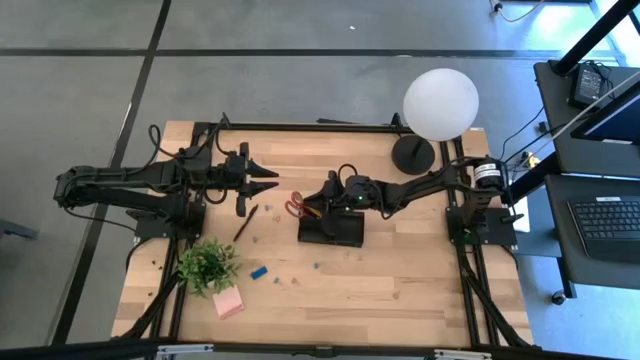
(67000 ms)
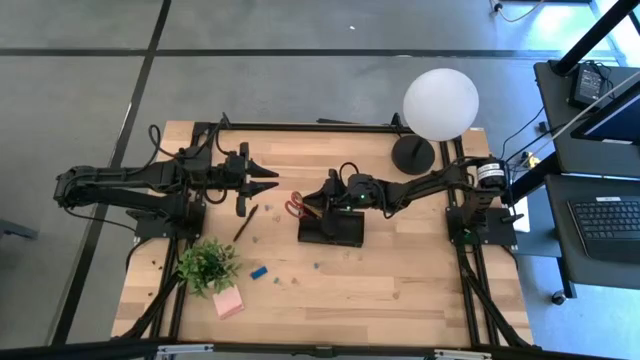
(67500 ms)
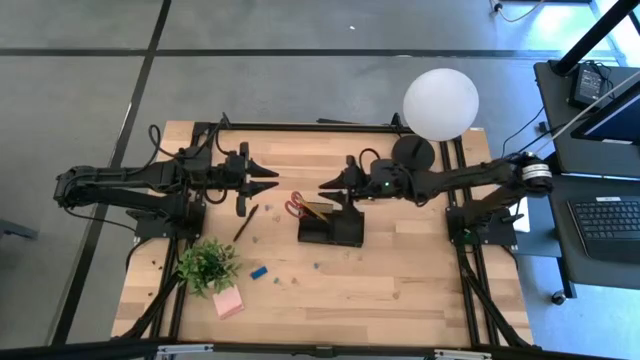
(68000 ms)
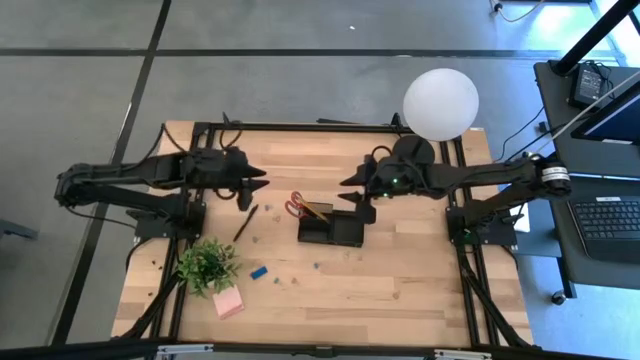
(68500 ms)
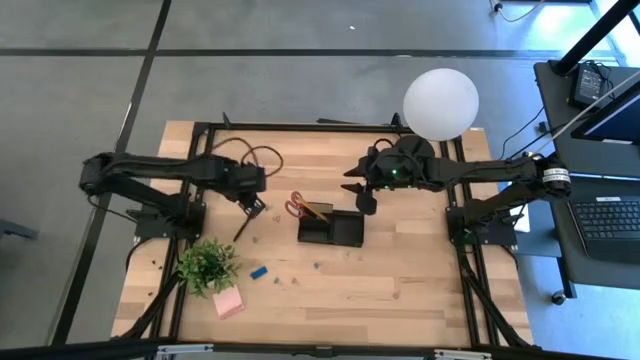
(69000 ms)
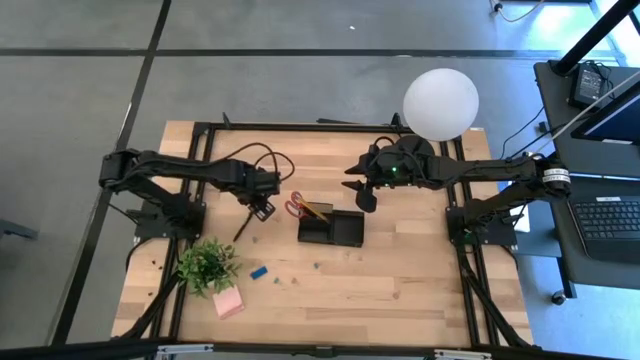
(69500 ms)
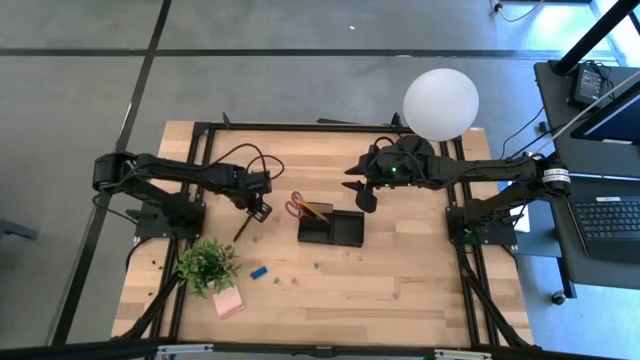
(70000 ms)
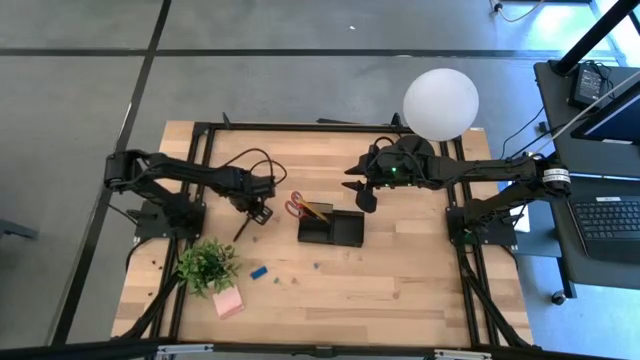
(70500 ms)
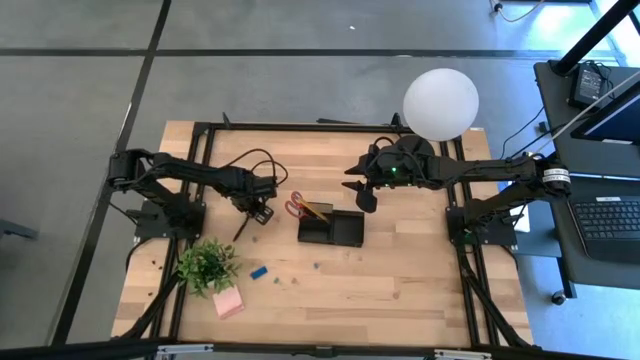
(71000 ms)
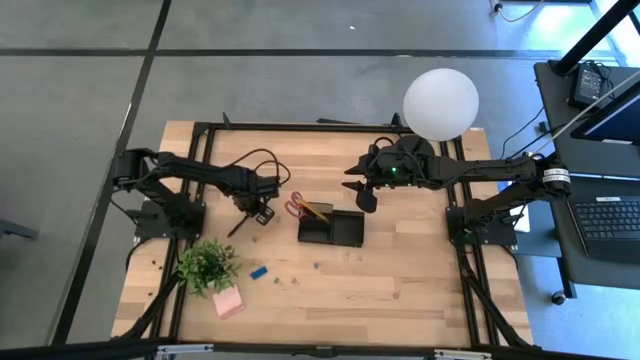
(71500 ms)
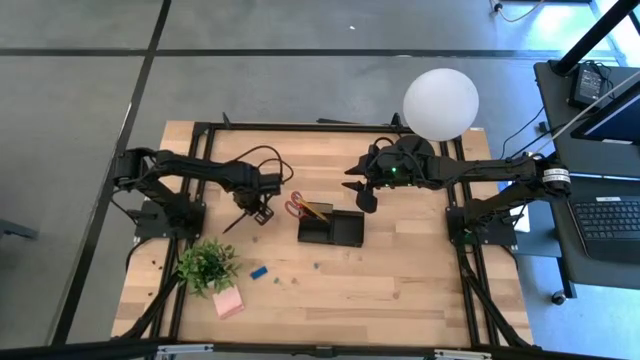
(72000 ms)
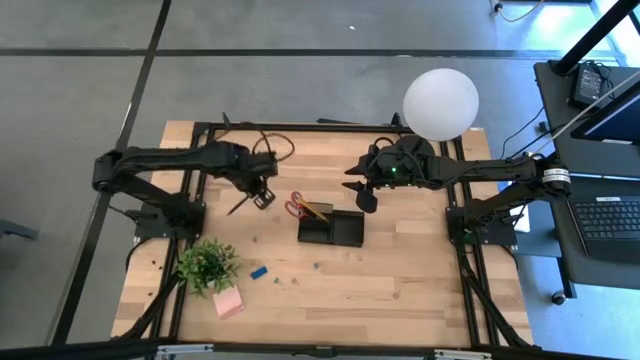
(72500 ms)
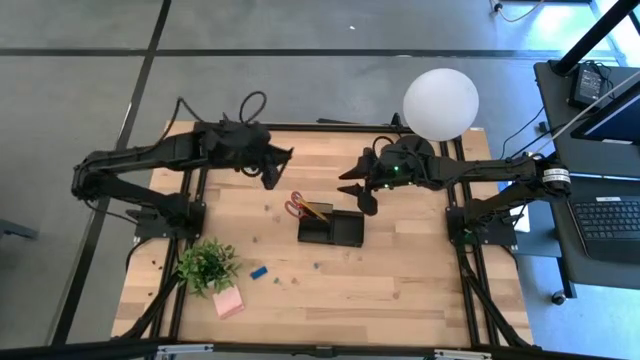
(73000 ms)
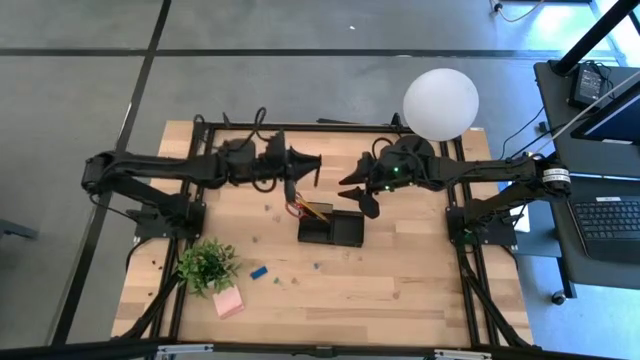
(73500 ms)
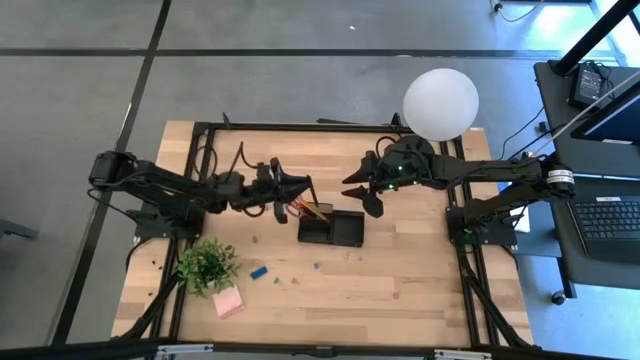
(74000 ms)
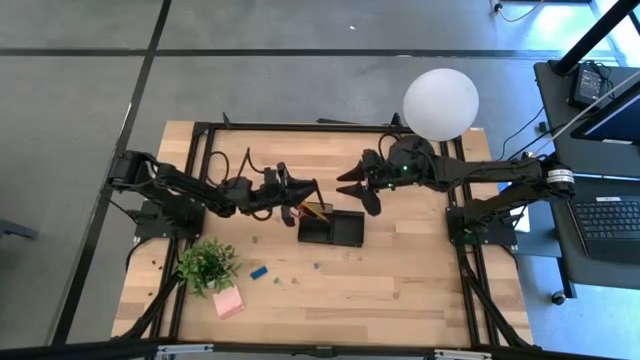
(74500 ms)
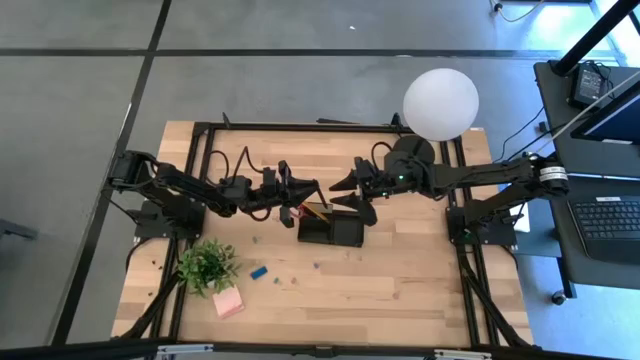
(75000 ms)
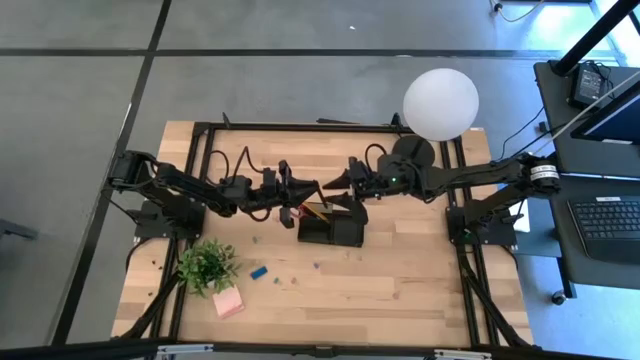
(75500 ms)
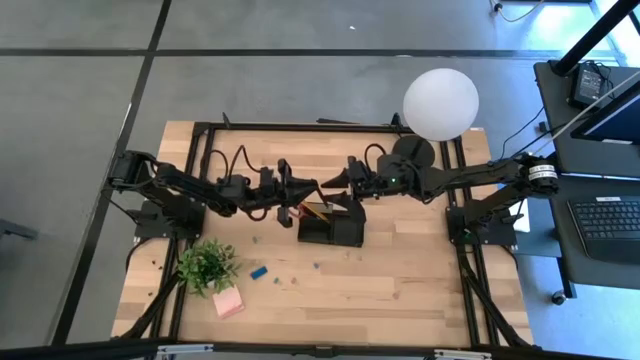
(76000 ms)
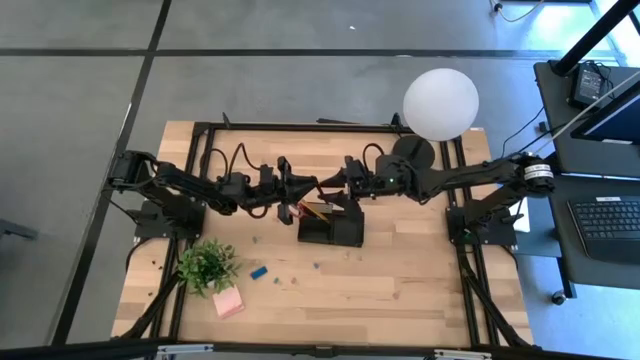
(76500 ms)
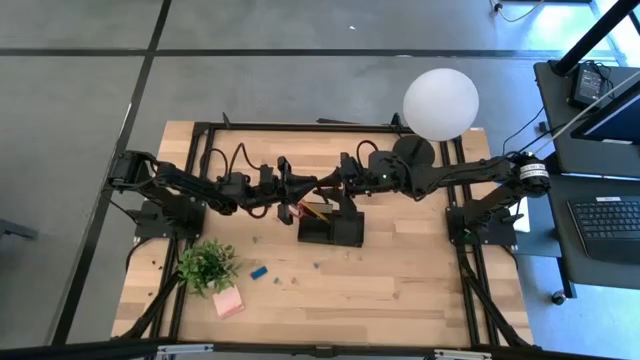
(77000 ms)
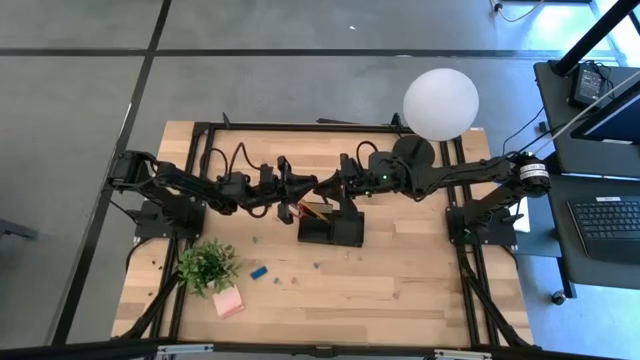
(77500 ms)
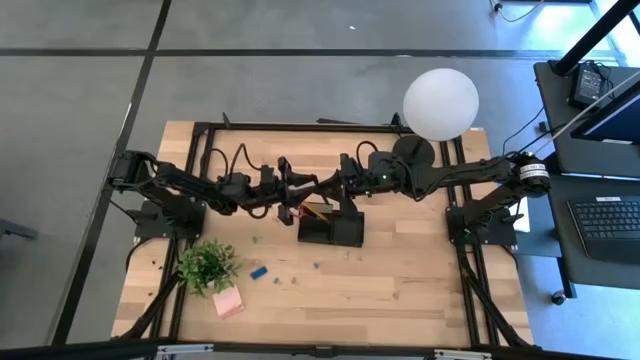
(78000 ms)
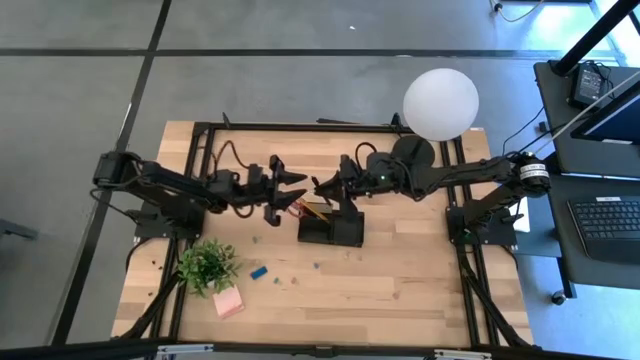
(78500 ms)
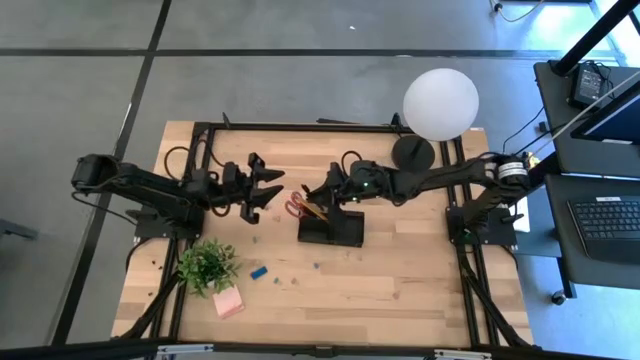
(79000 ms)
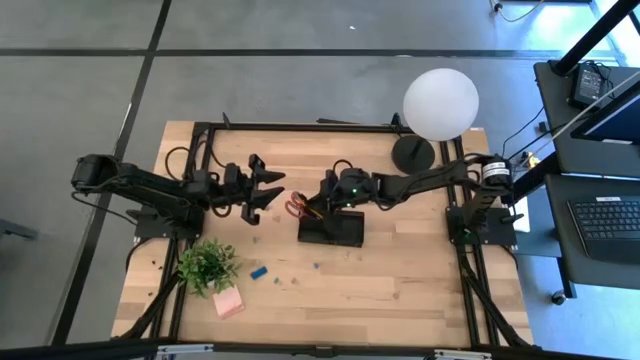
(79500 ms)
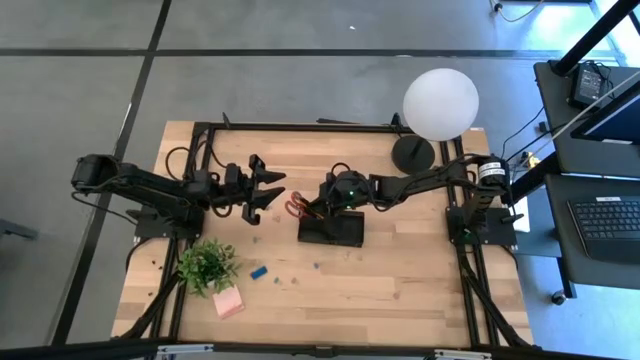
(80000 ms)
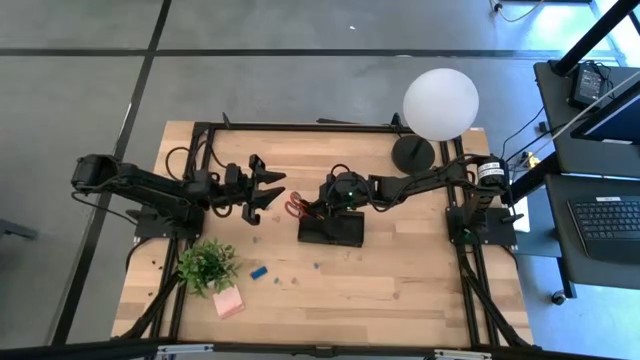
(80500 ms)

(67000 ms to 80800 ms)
Task: Pick and place office supplies into organizer
Put the black pen into the black desk organizer

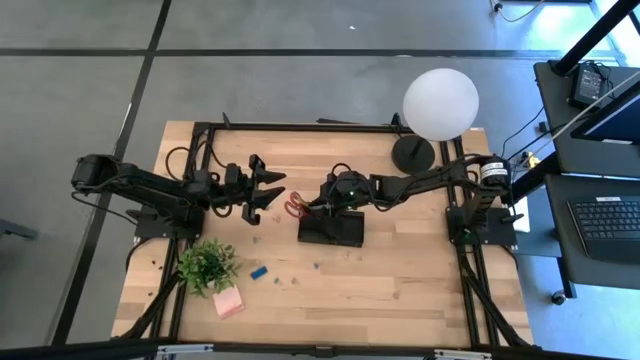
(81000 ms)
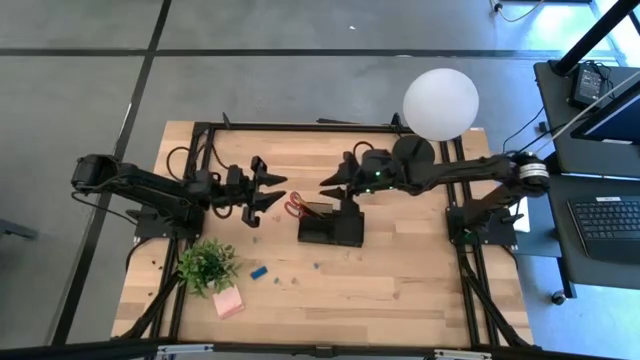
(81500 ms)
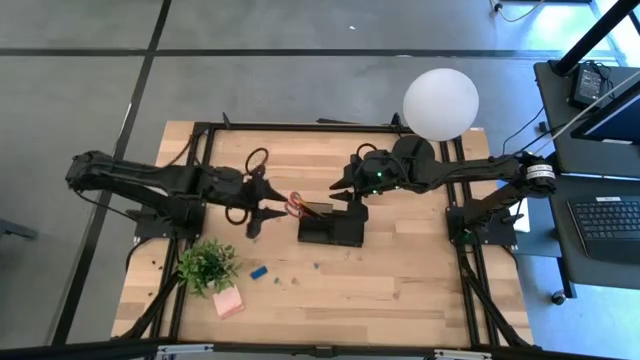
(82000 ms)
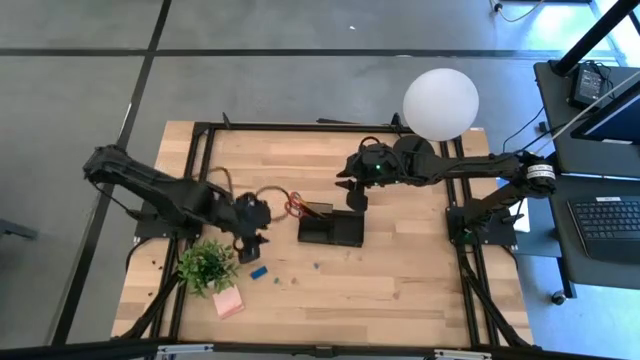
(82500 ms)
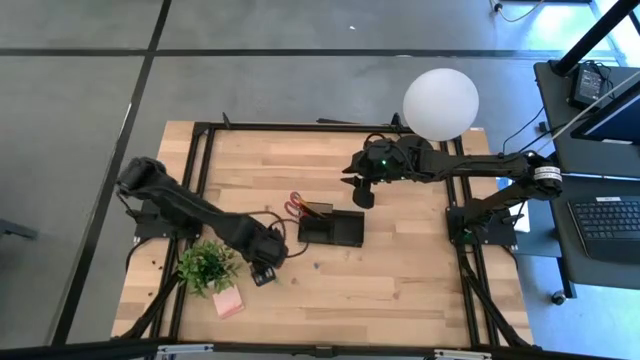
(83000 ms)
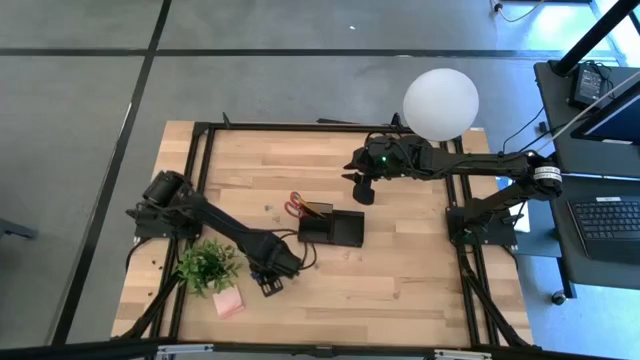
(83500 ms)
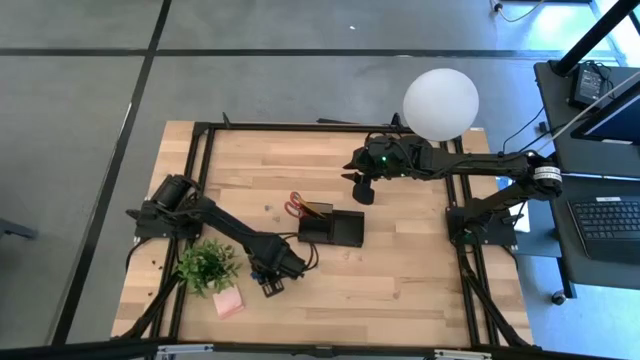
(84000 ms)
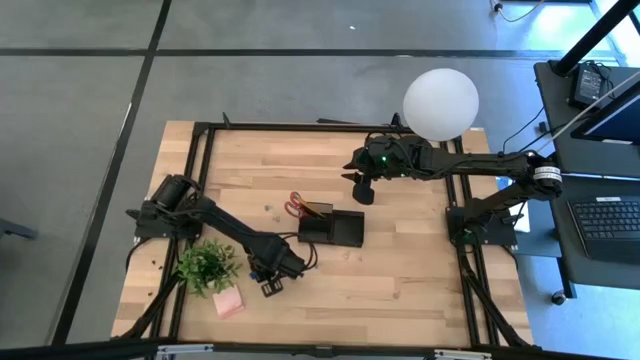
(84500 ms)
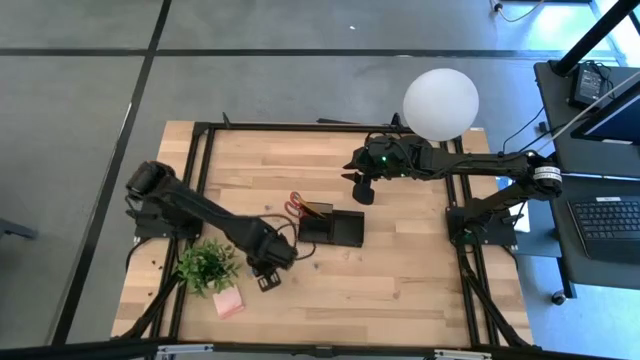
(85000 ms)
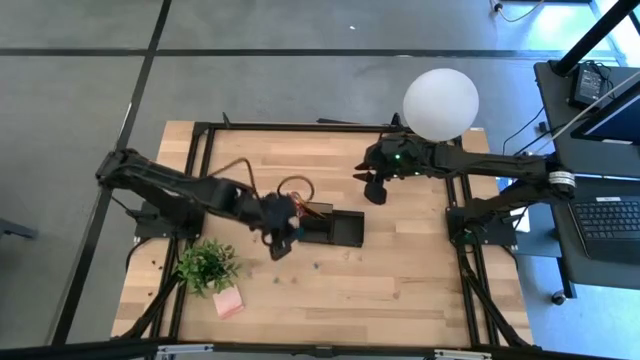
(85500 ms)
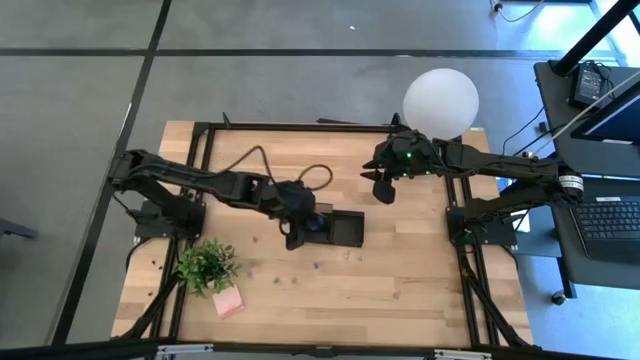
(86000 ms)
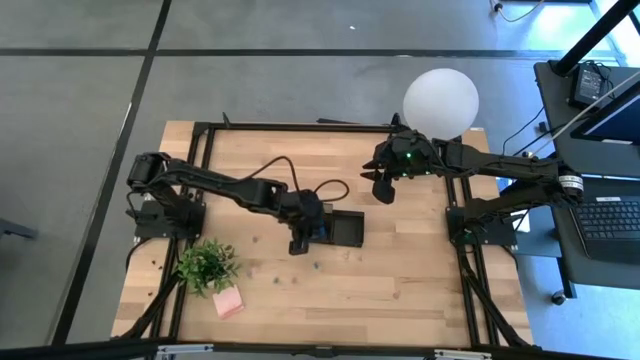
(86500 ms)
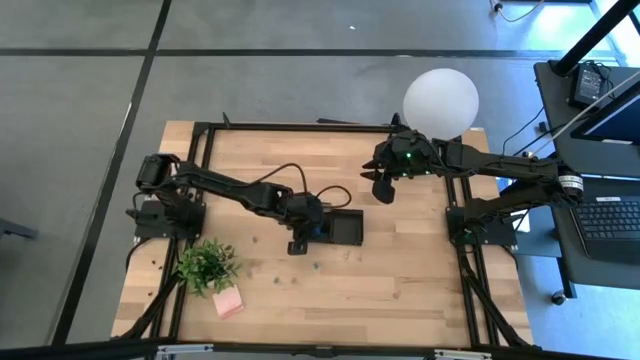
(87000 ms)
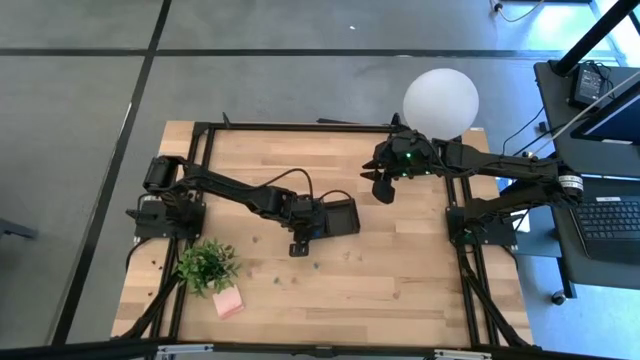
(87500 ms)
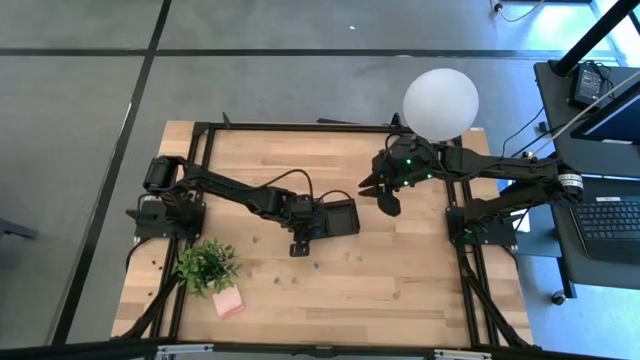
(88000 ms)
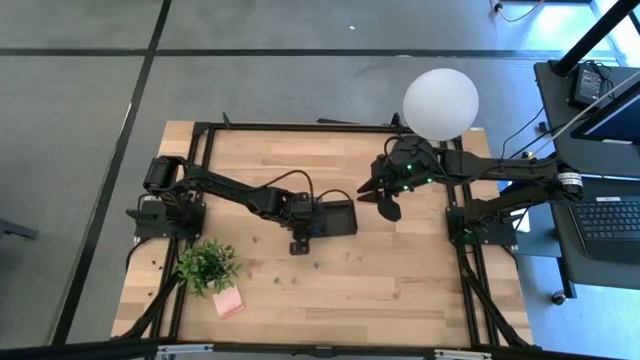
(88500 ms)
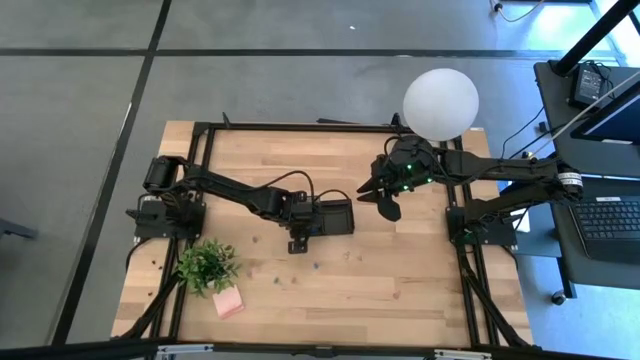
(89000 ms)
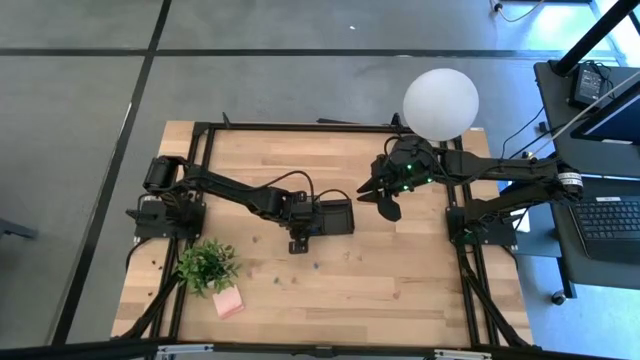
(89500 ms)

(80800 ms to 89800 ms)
Put the blue eraser into the black desk organizer
